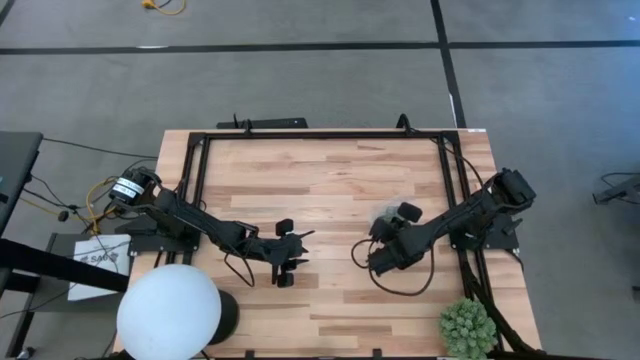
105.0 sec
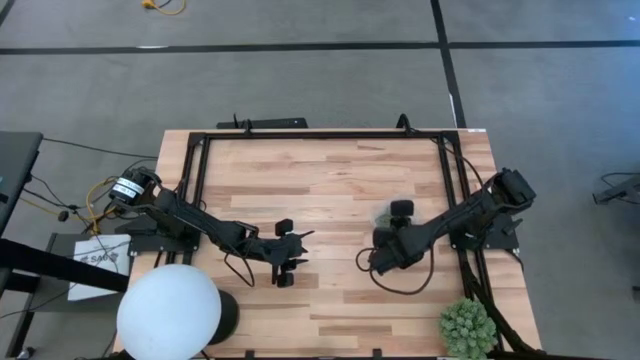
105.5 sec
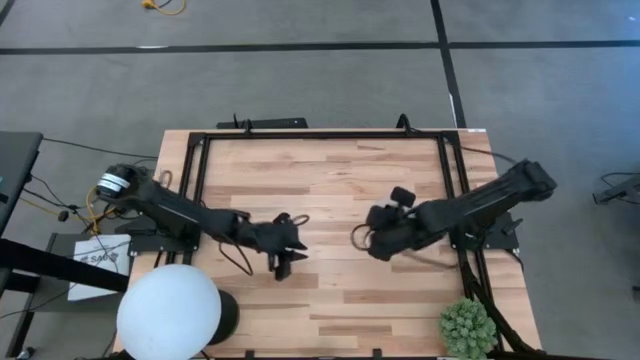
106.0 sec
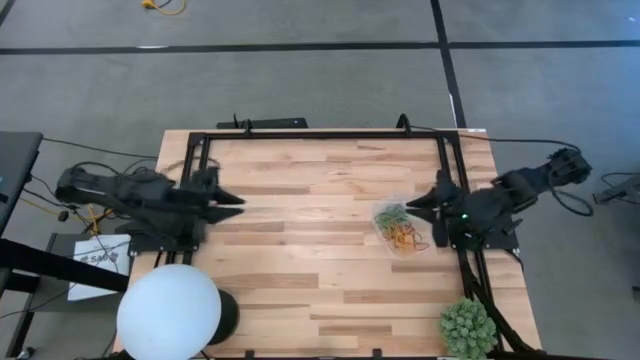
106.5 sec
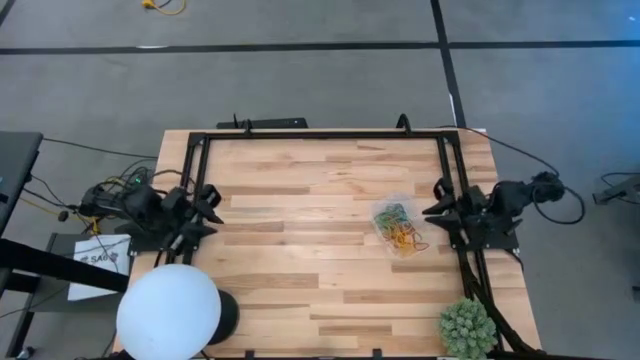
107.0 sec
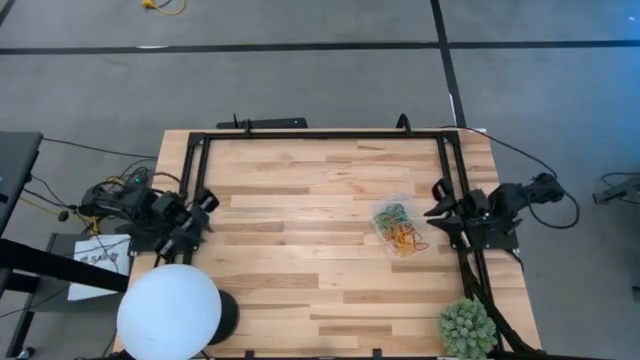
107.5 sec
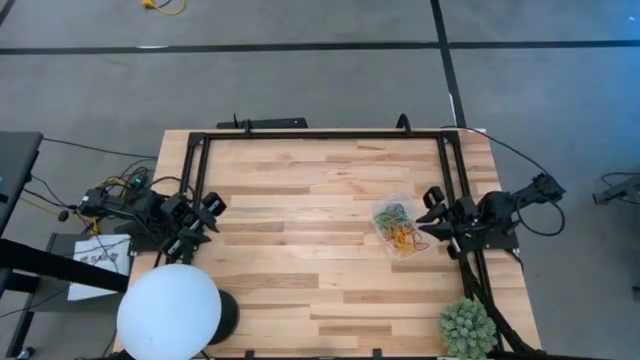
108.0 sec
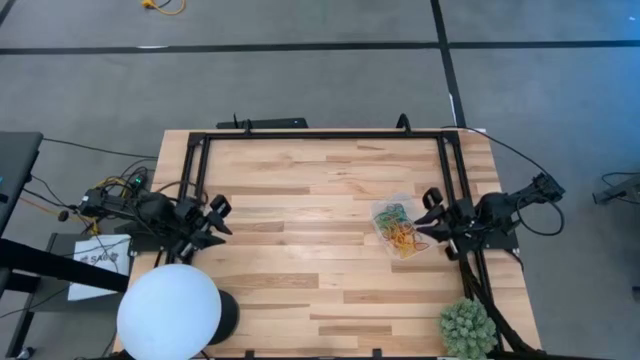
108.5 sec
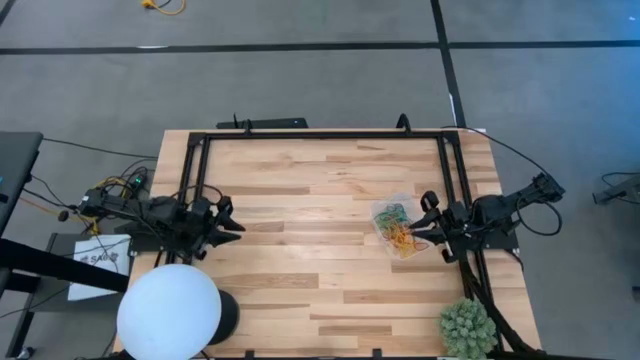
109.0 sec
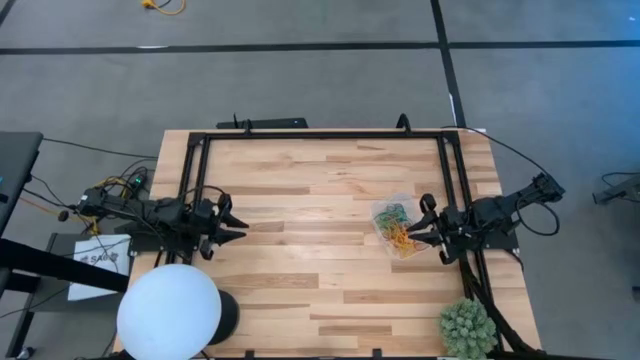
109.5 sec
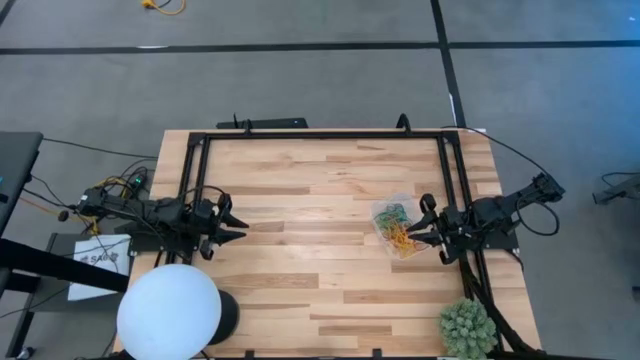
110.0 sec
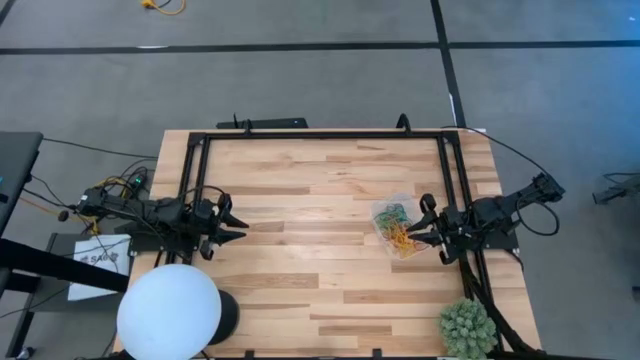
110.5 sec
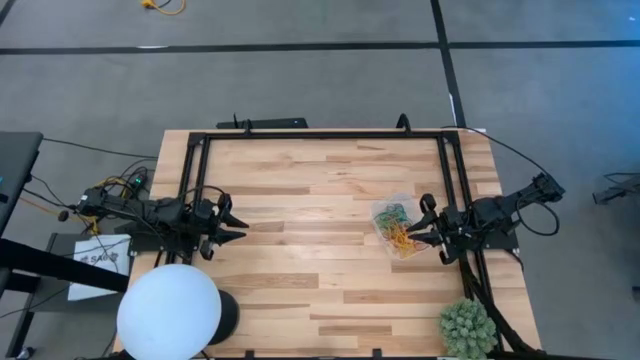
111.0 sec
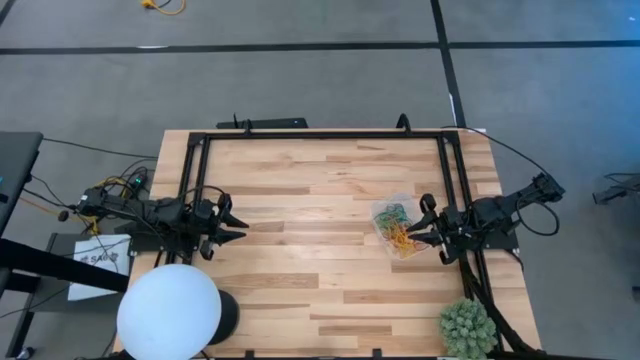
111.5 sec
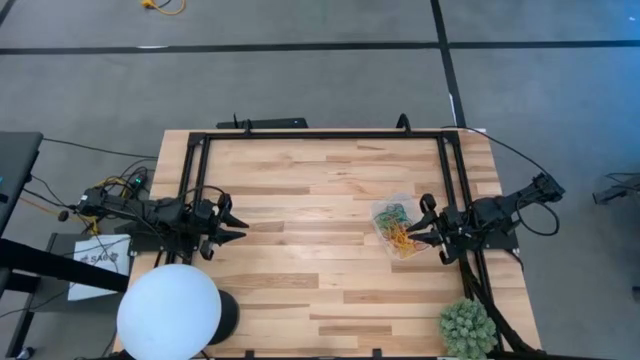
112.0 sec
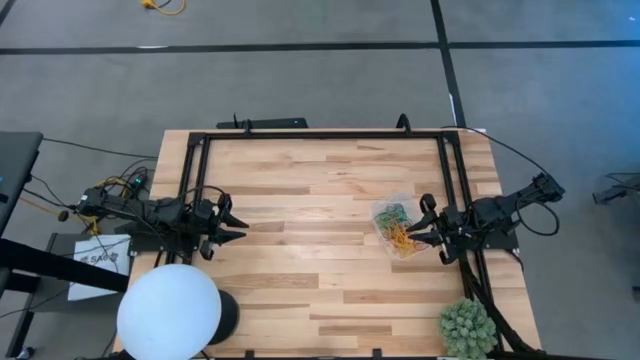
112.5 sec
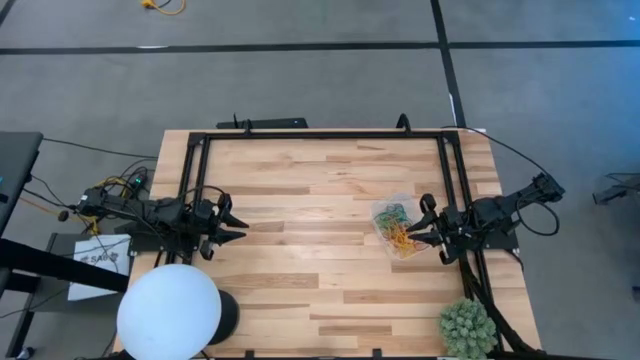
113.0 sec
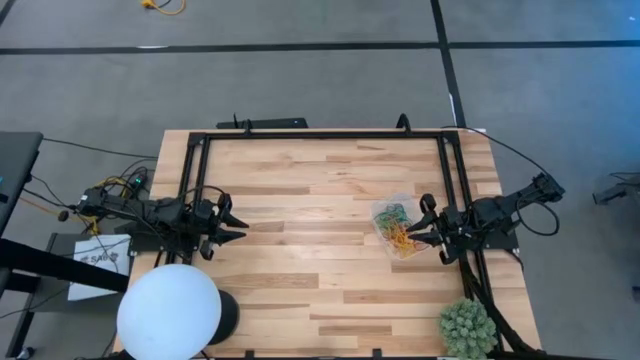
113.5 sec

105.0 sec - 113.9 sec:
Task: Pick and place items into bin
Return to Home Position

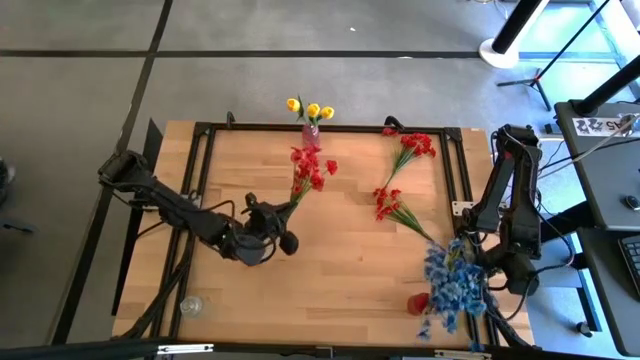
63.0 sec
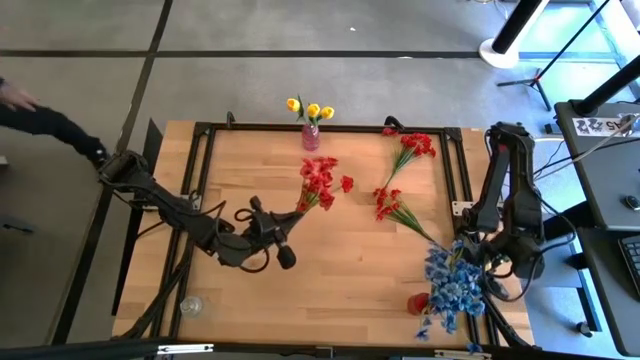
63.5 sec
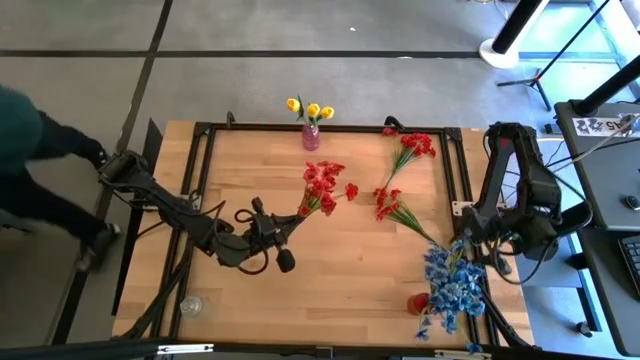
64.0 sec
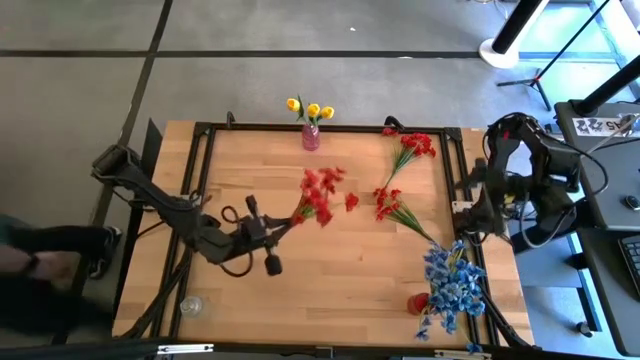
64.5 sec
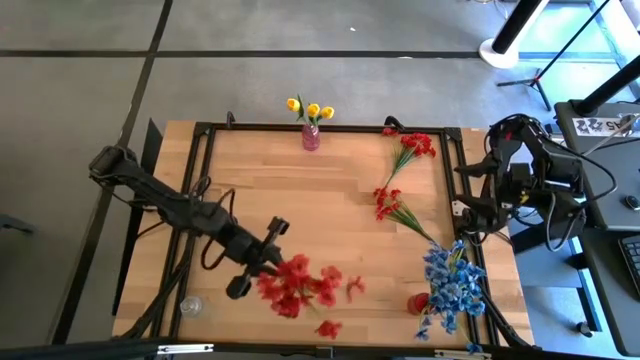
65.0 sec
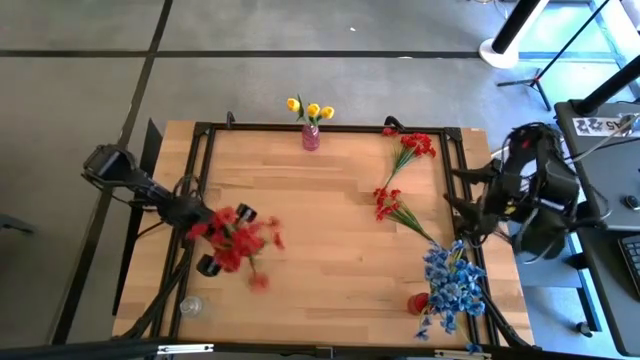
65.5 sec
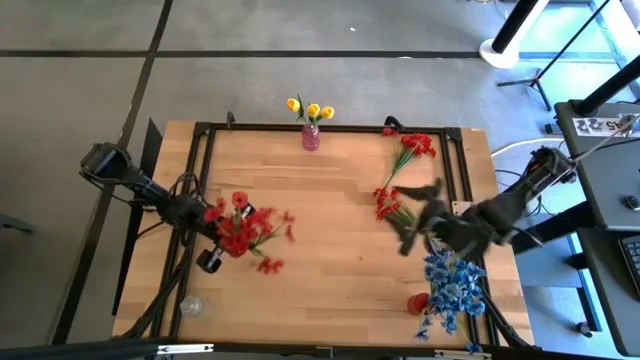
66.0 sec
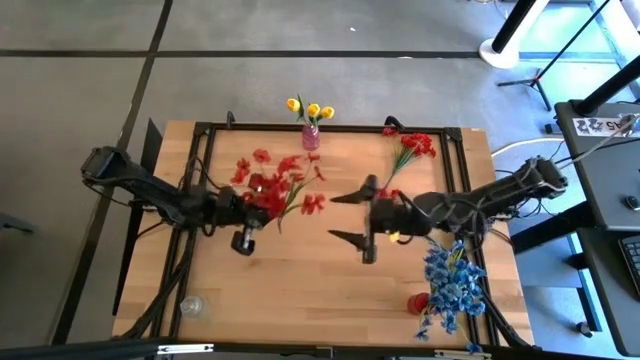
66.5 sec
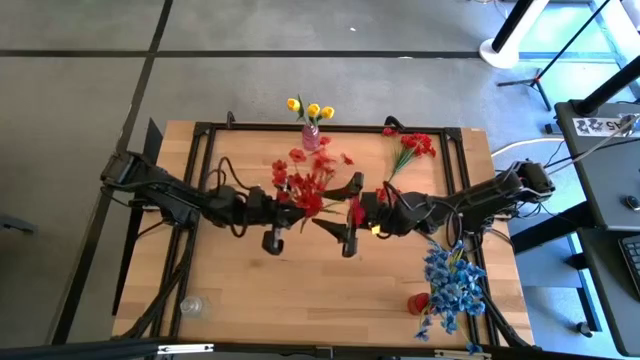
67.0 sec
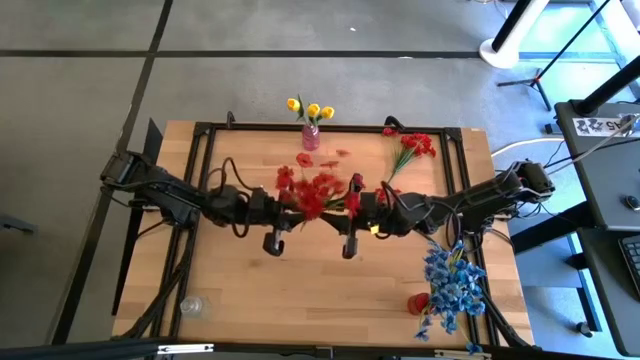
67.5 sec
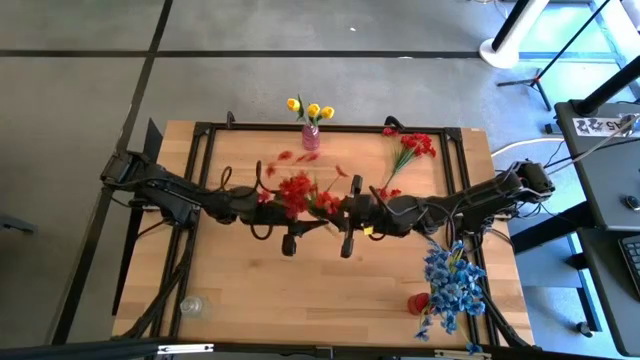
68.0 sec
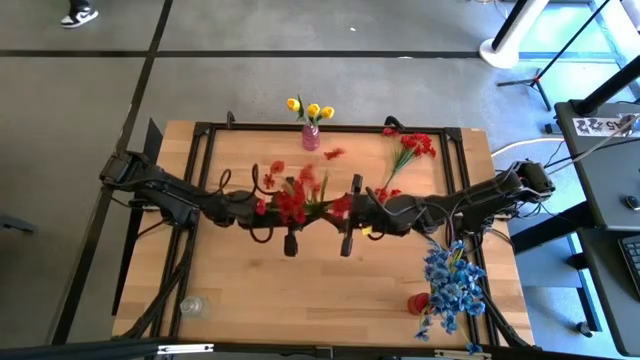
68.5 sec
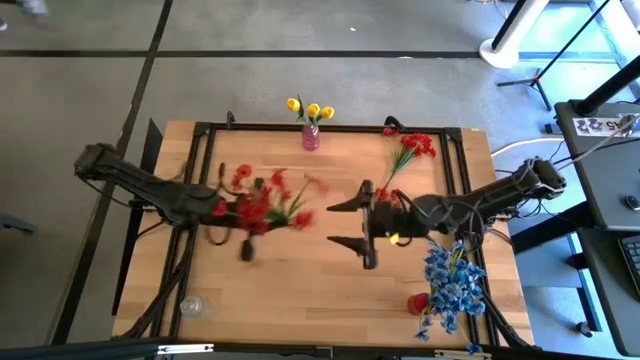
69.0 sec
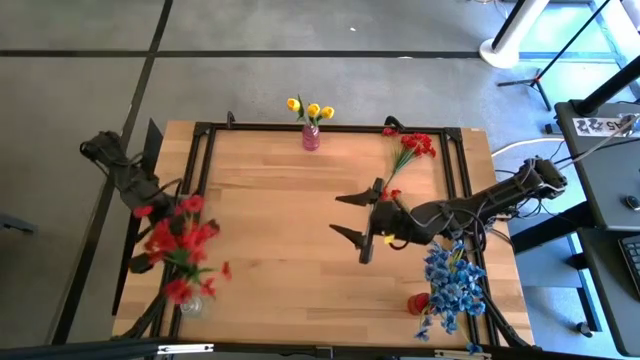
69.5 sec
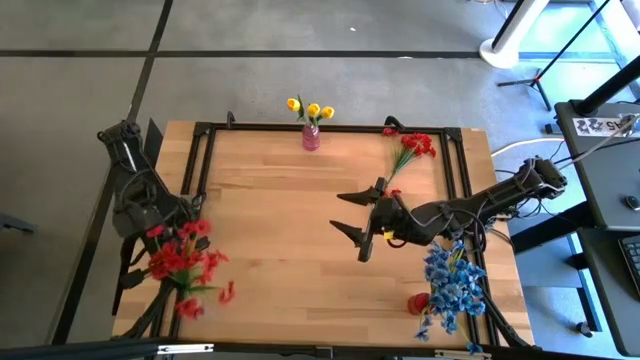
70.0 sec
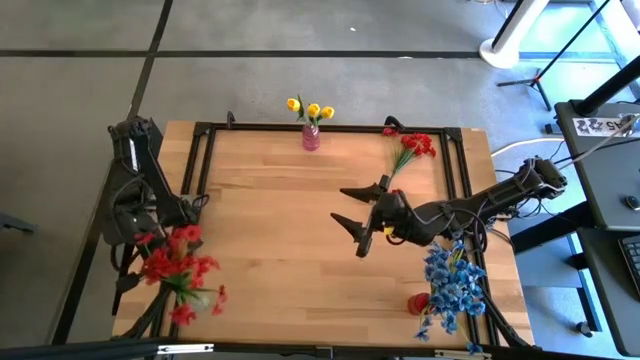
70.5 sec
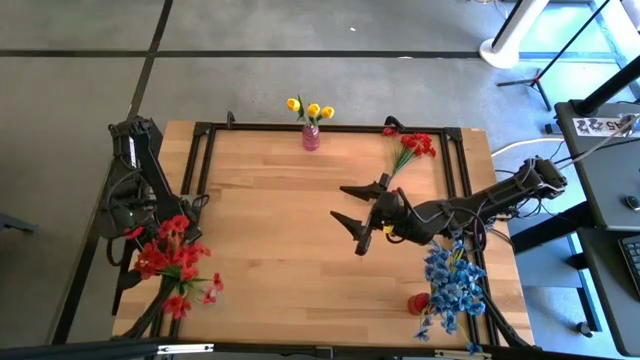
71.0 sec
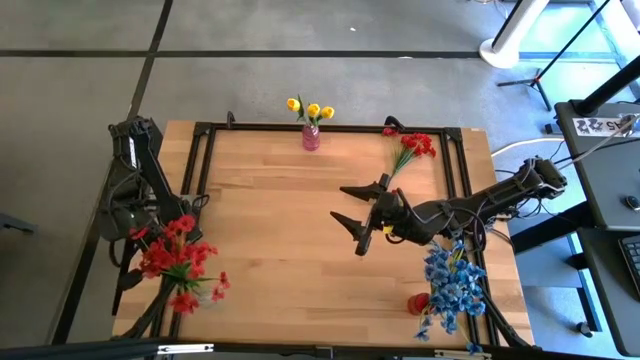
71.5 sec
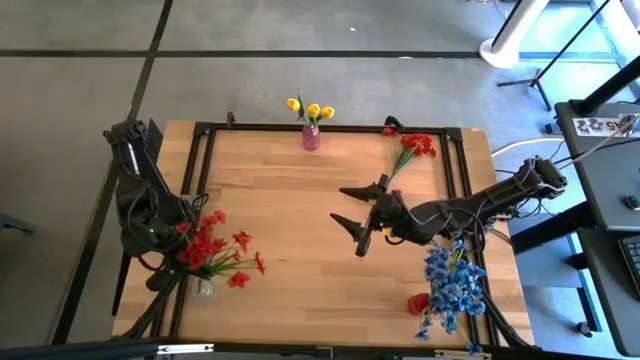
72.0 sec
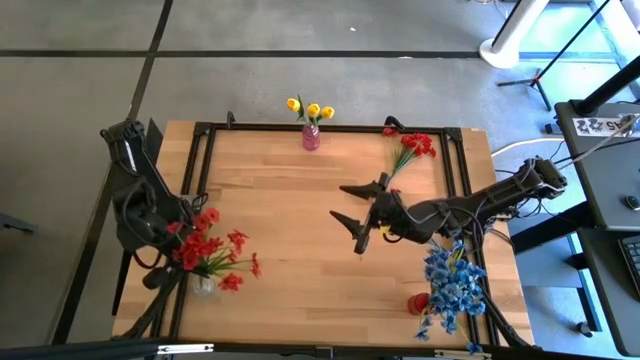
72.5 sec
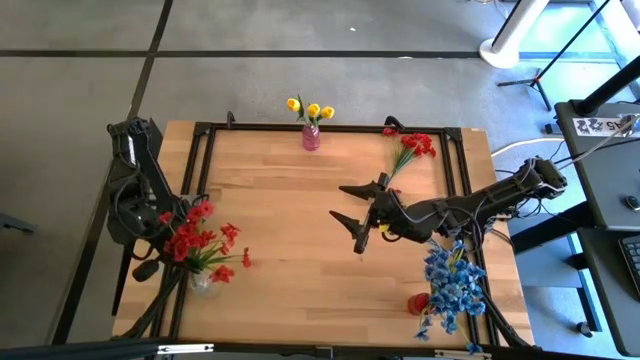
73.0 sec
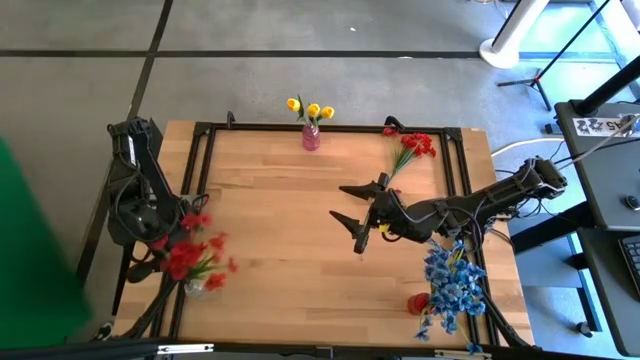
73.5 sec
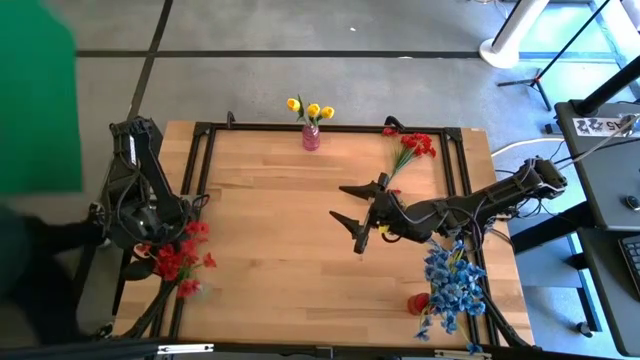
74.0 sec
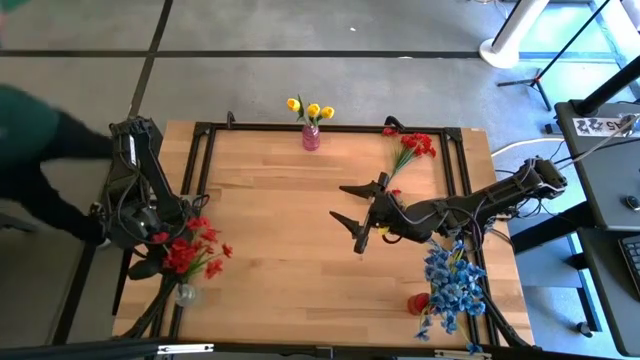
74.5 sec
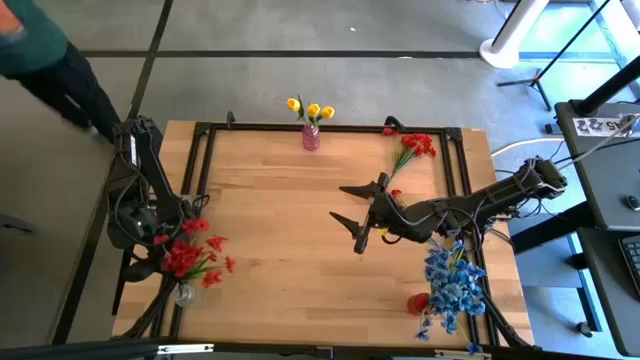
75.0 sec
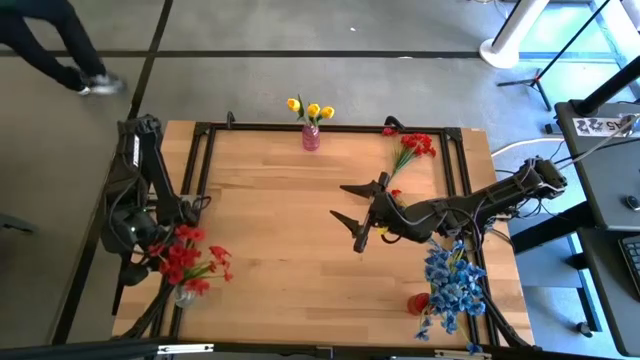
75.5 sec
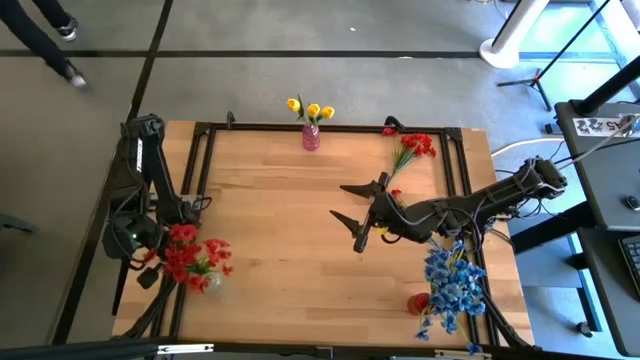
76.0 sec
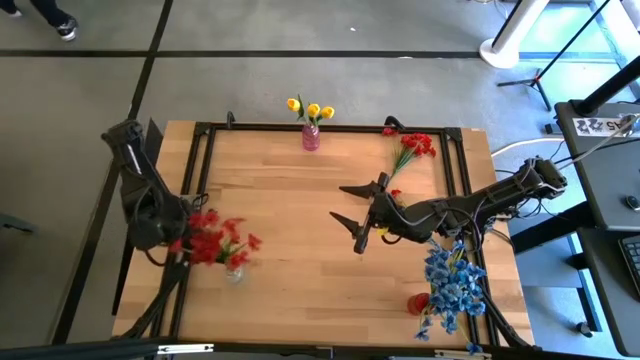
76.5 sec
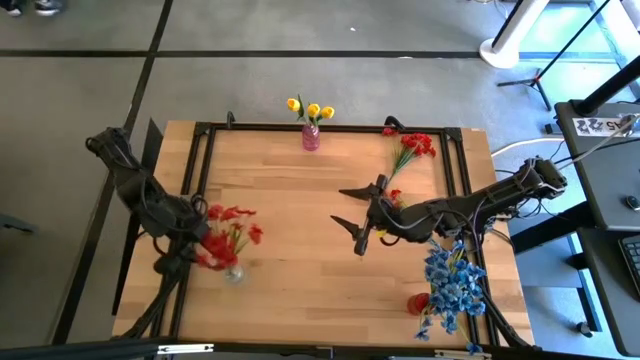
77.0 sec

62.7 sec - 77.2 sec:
Task: Sort flowers into vase by color
Put the top left red flowers into the transparent vase
